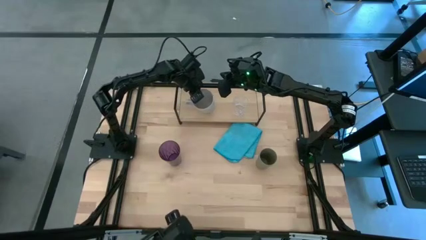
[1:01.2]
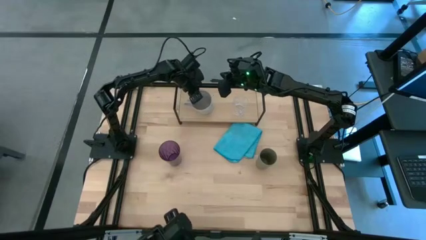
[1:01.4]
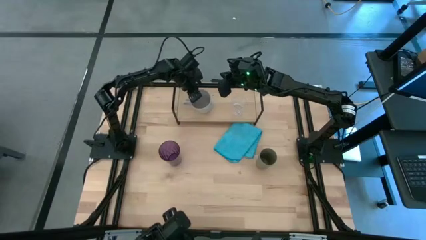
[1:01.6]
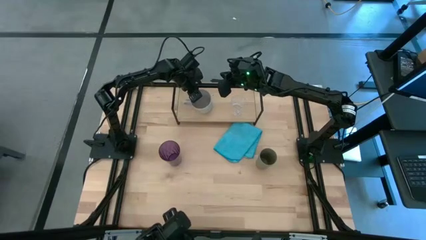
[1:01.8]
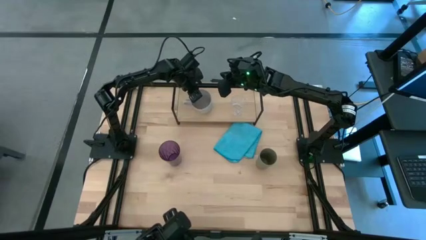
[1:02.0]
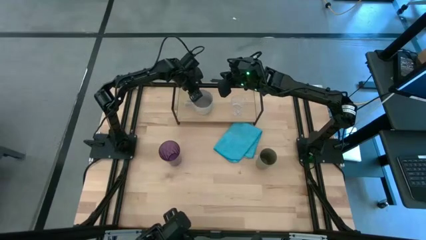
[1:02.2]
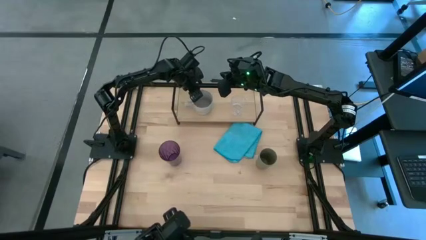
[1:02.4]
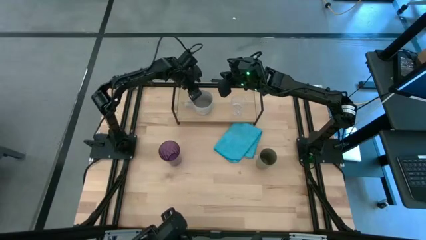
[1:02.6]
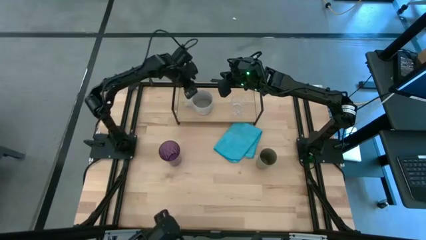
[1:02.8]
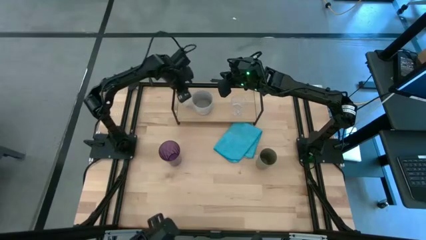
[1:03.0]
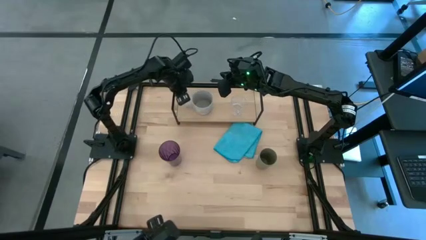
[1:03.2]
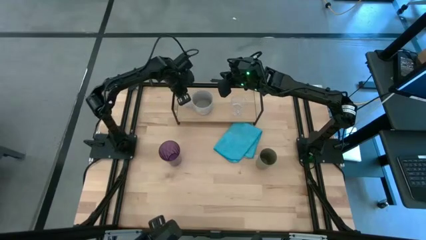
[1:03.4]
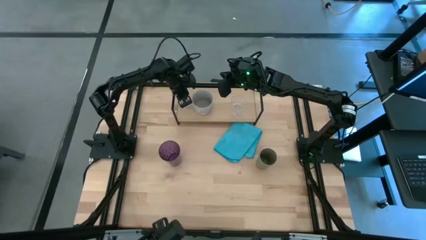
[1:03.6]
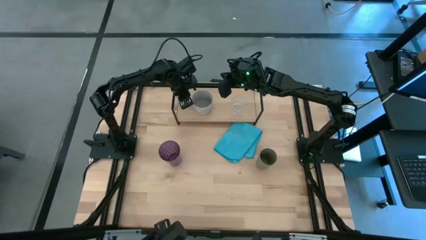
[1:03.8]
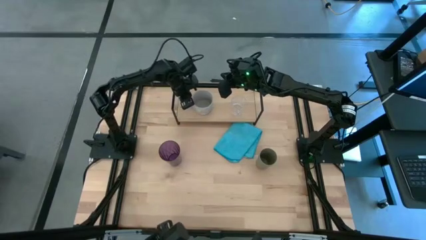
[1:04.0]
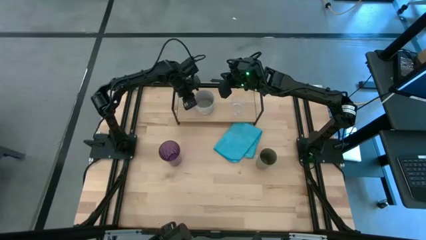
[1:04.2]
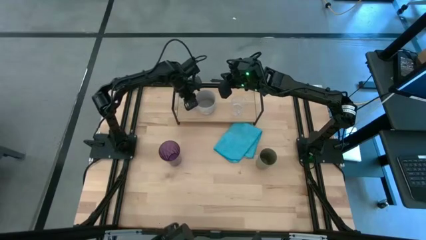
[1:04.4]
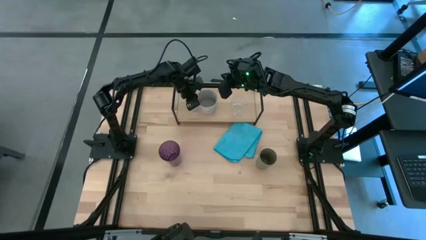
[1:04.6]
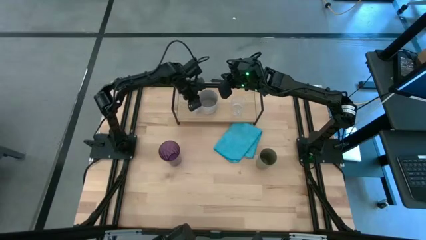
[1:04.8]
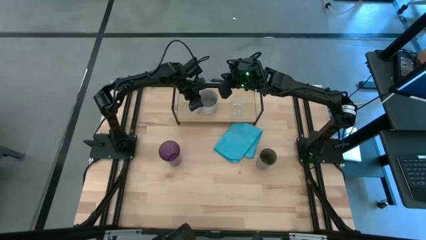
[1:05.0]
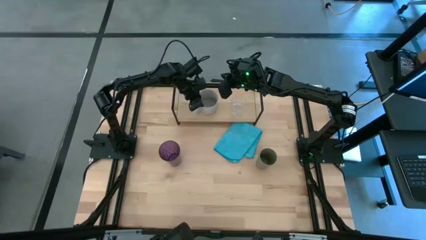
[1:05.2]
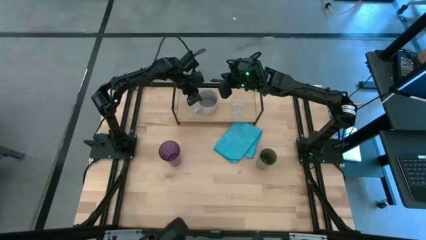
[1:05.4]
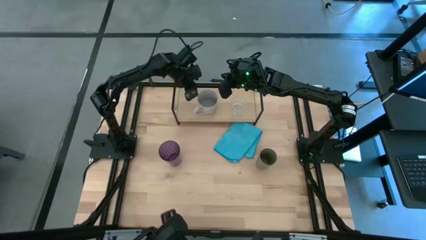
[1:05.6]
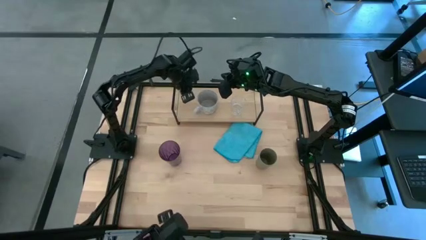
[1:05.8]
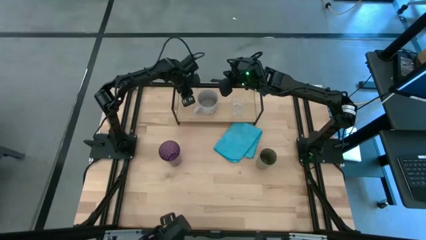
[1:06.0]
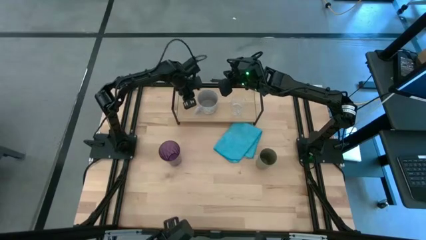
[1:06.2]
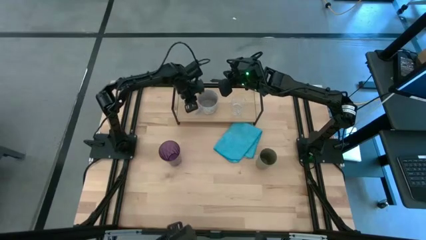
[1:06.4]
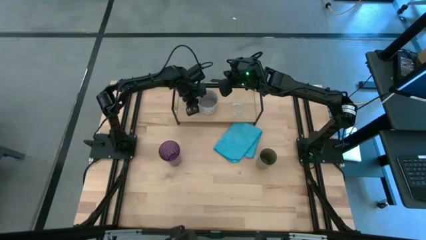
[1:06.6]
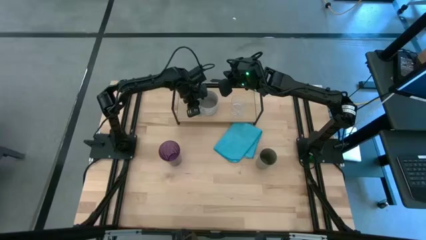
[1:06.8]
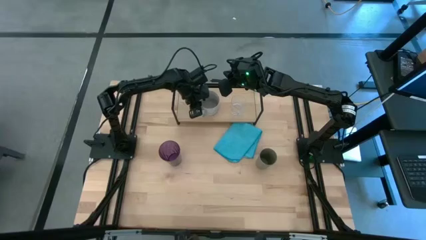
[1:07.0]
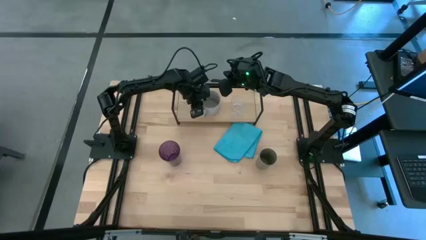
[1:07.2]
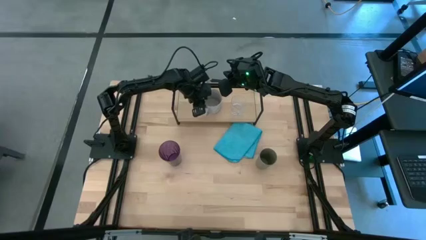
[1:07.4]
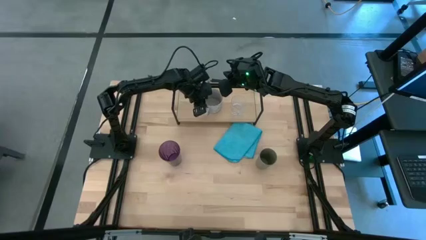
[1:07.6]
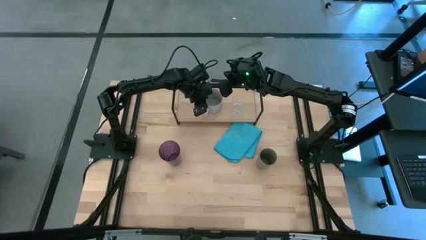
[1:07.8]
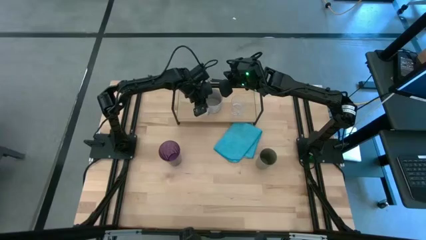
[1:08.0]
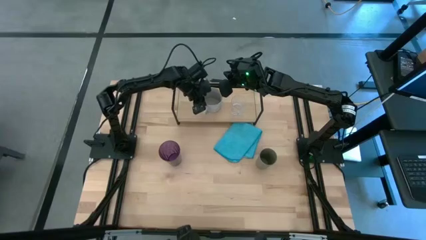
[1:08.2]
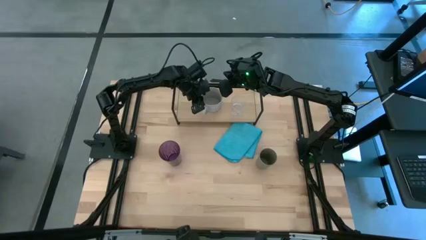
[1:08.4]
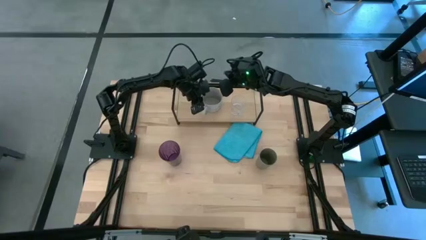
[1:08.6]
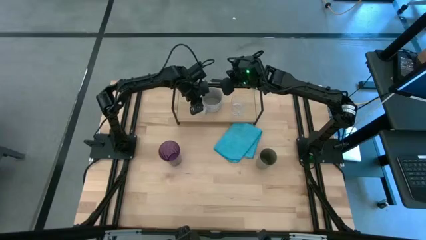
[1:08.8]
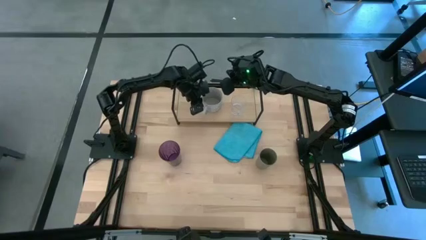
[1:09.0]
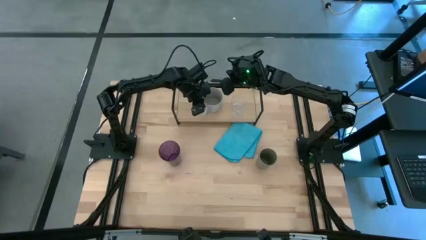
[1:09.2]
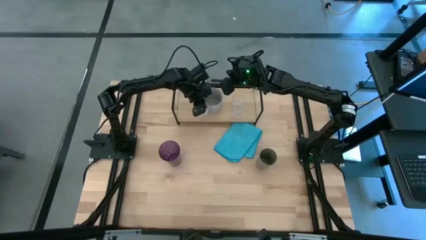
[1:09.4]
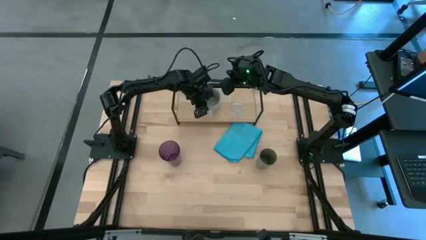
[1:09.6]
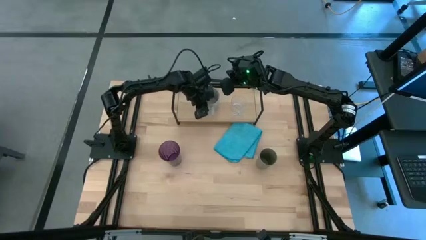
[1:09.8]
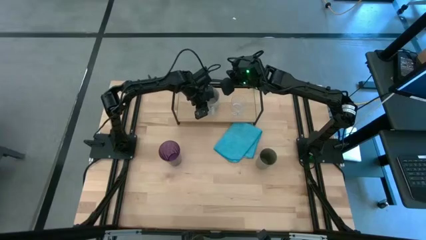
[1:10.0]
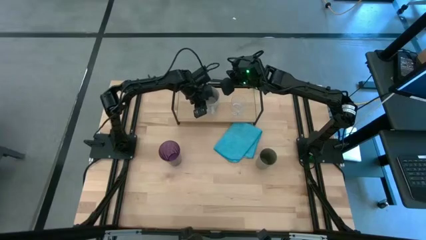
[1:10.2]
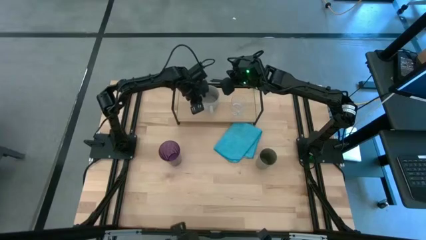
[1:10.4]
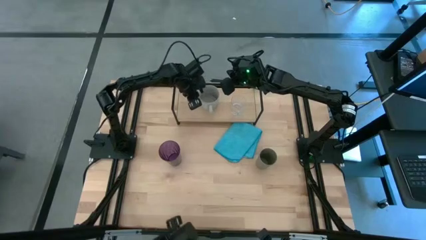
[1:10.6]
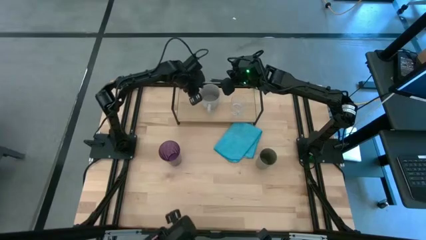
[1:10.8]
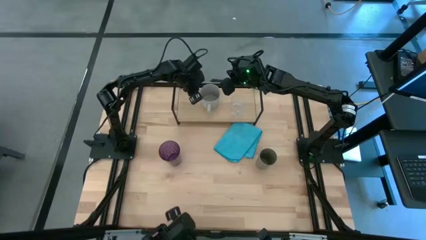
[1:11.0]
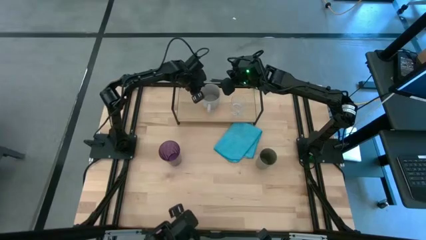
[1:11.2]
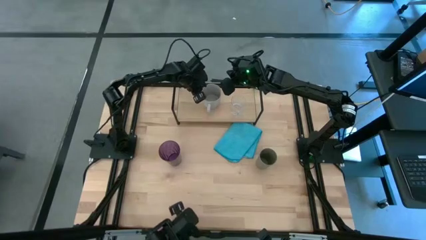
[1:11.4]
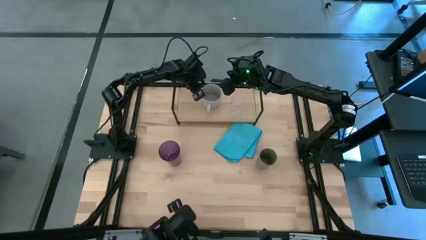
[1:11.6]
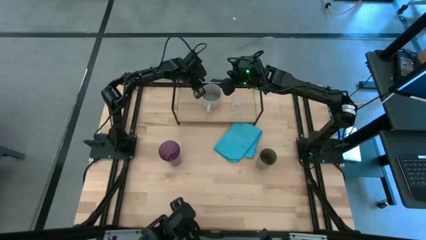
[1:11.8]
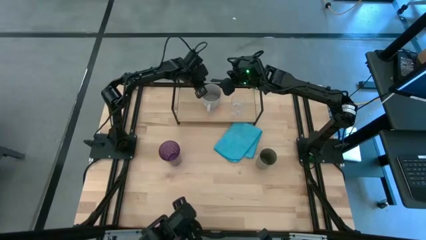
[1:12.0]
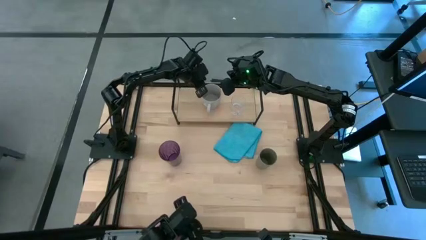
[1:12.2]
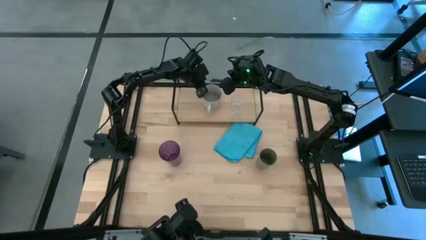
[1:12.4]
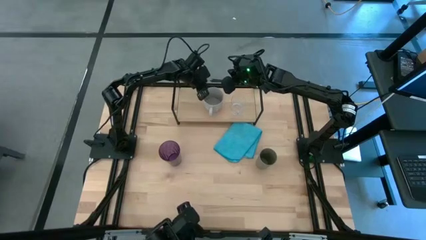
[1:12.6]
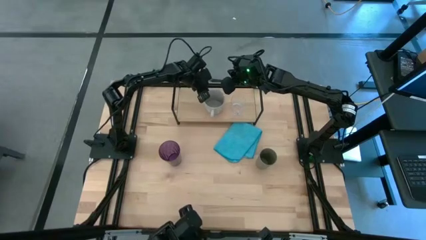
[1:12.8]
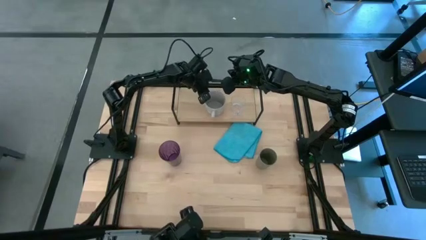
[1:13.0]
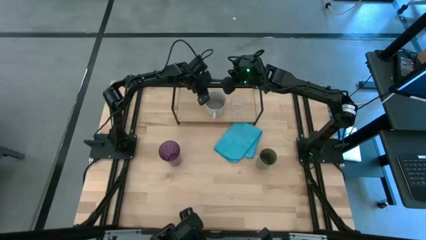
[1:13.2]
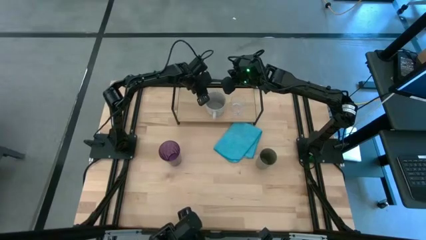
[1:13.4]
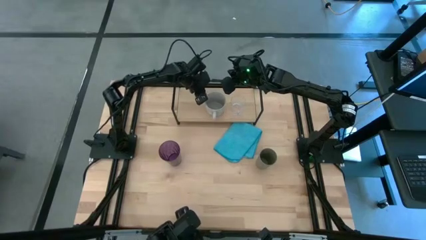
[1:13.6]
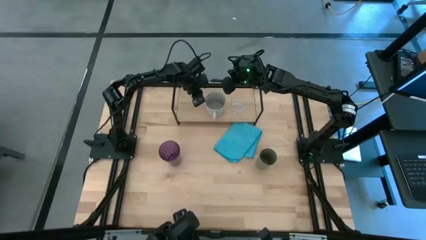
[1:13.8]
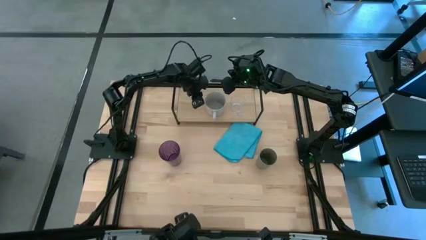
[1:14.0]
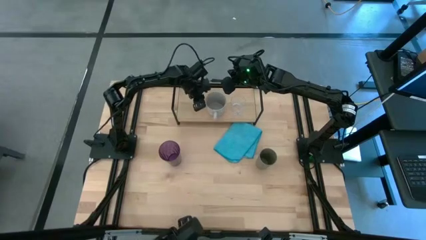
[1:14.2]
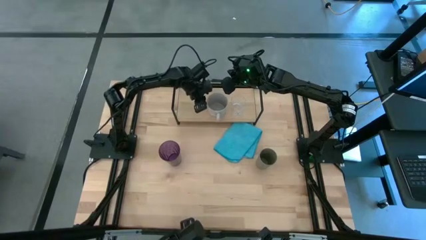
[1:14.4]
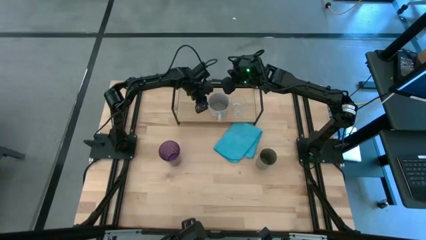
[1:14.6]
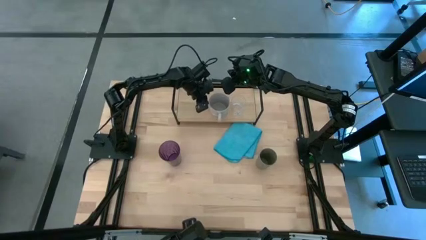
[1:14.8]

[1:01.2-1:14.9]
Task: Stack small to large cups/mugs on shelf
Put the gray mug on the shelf
